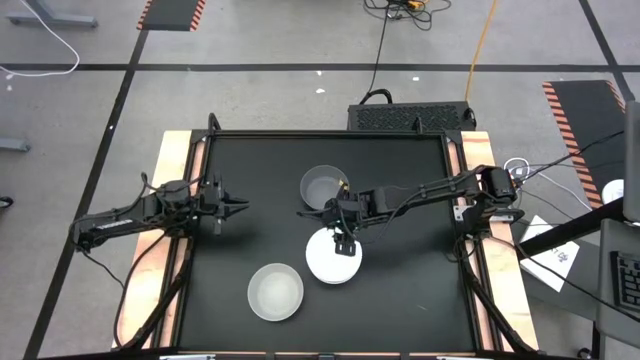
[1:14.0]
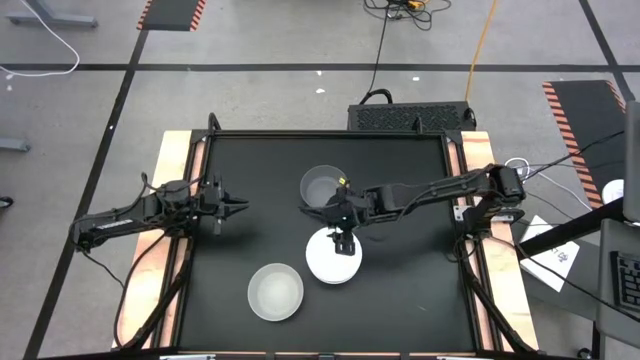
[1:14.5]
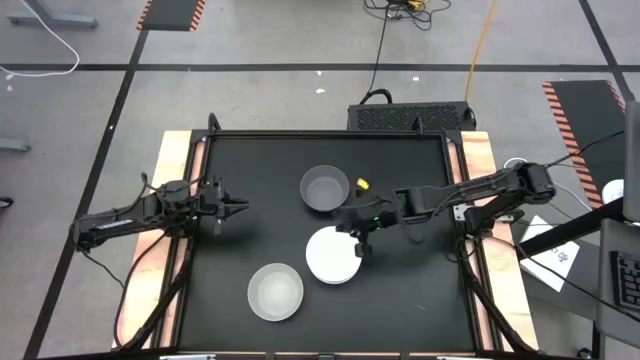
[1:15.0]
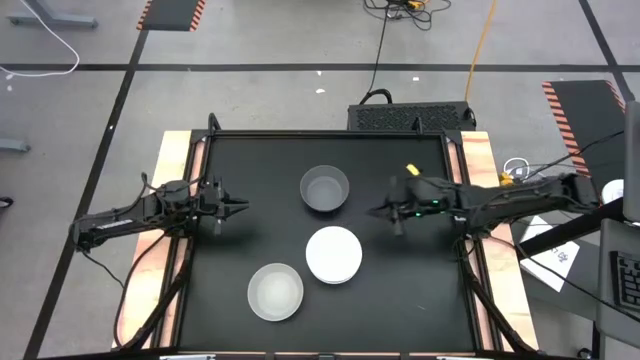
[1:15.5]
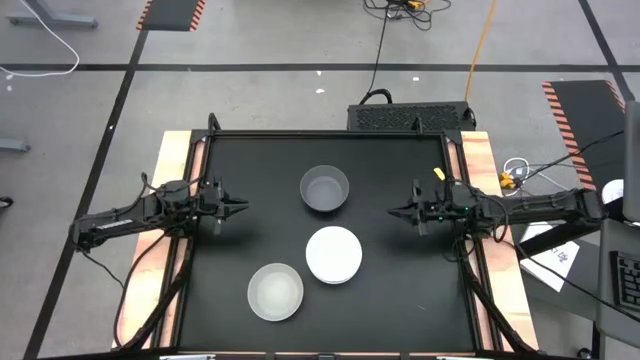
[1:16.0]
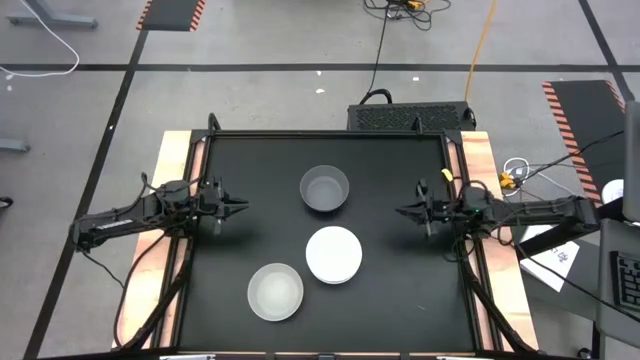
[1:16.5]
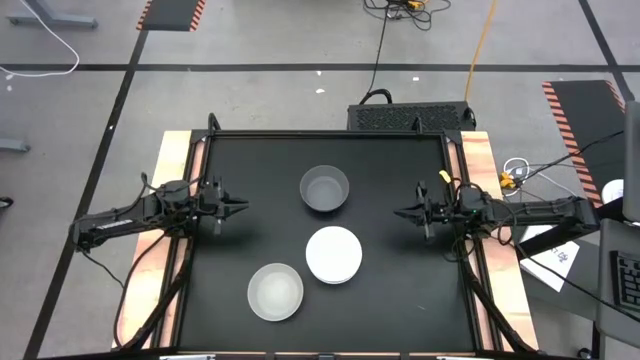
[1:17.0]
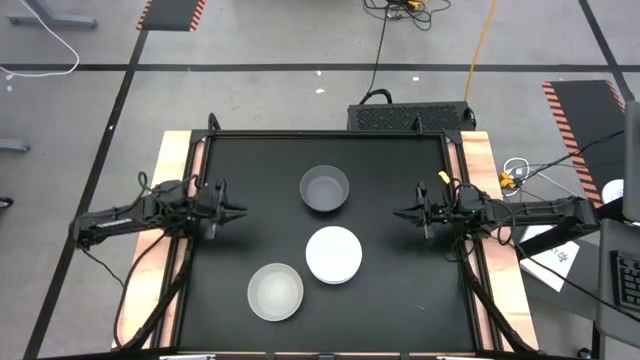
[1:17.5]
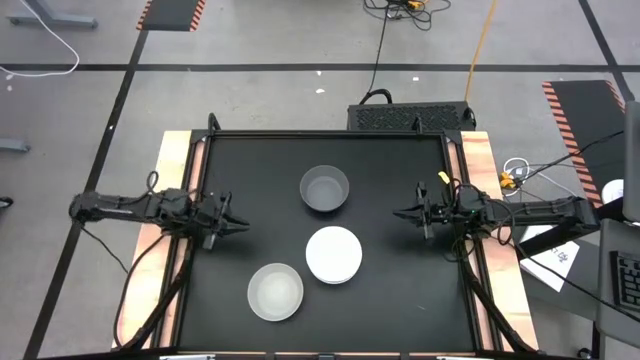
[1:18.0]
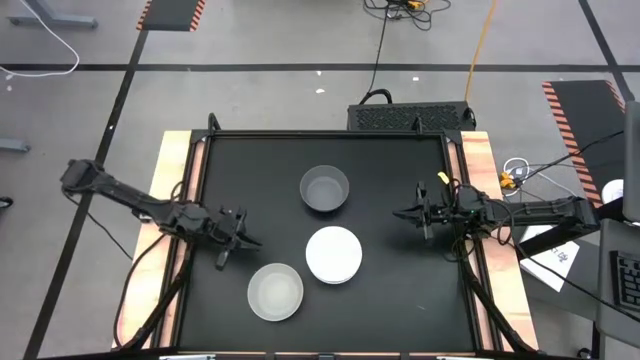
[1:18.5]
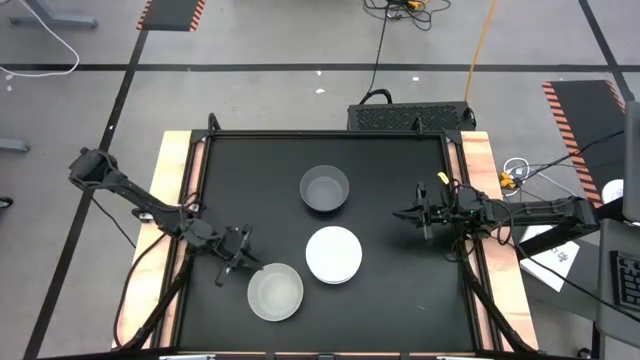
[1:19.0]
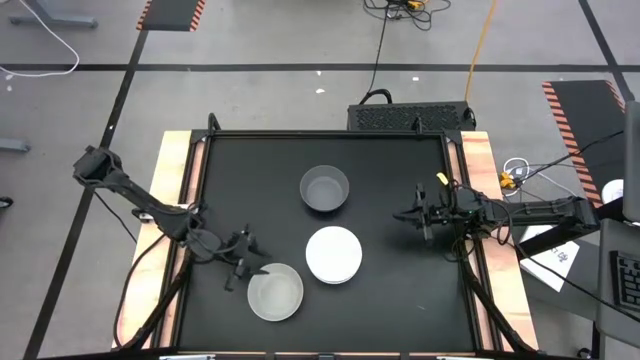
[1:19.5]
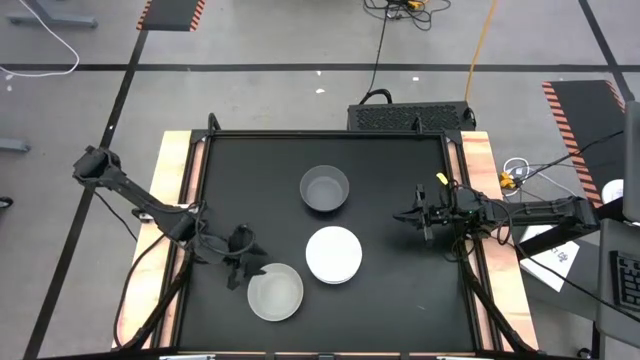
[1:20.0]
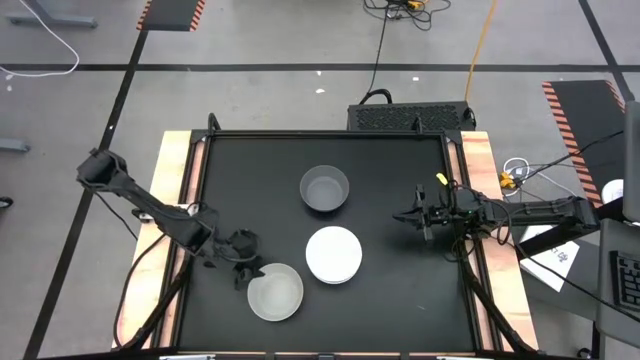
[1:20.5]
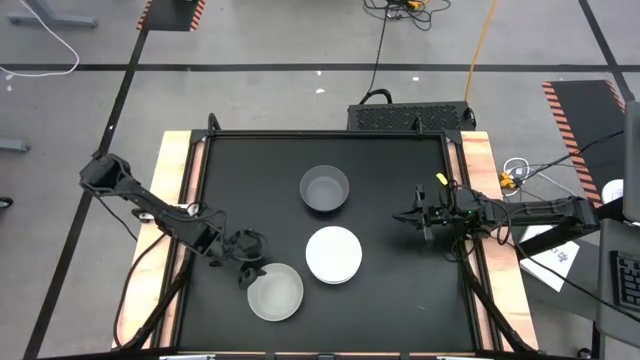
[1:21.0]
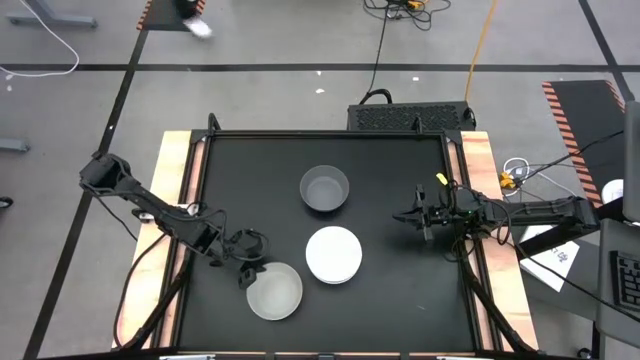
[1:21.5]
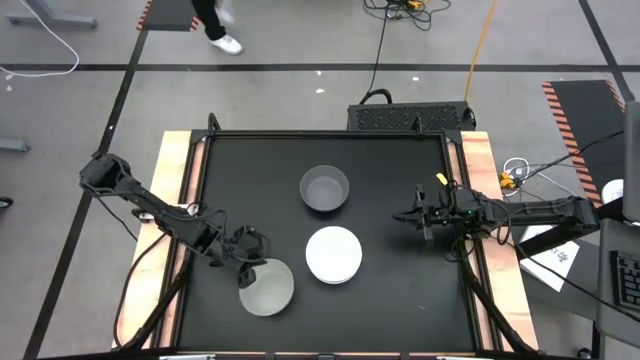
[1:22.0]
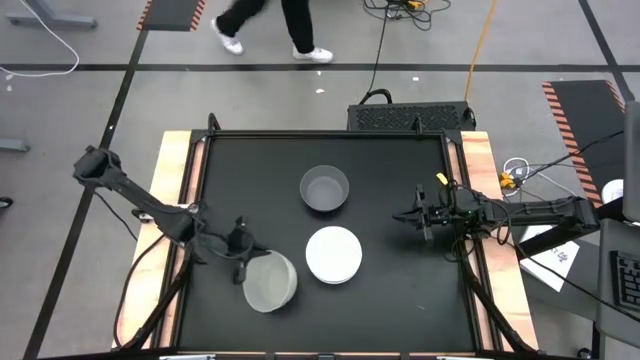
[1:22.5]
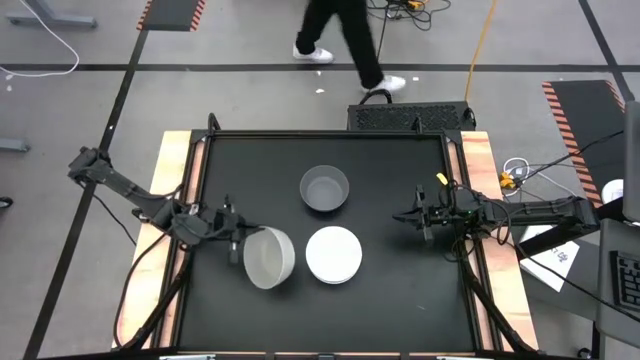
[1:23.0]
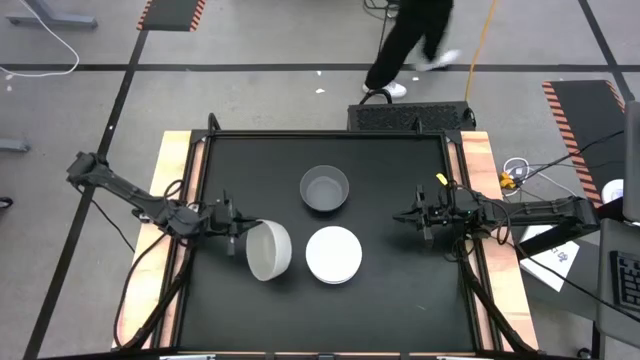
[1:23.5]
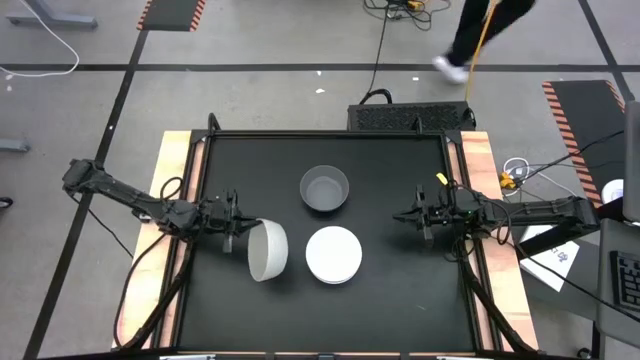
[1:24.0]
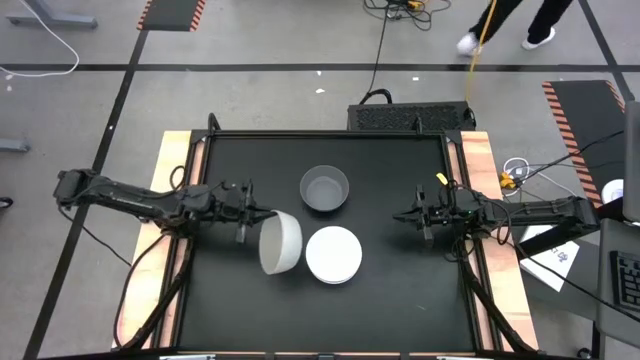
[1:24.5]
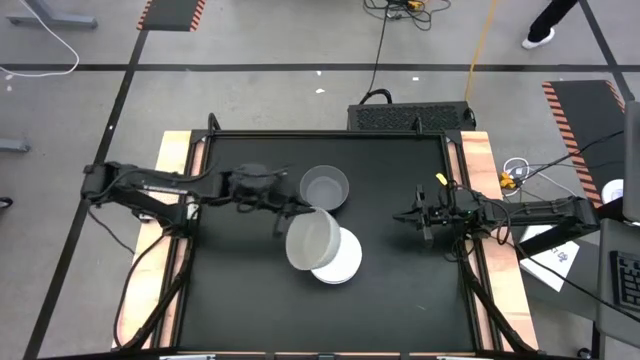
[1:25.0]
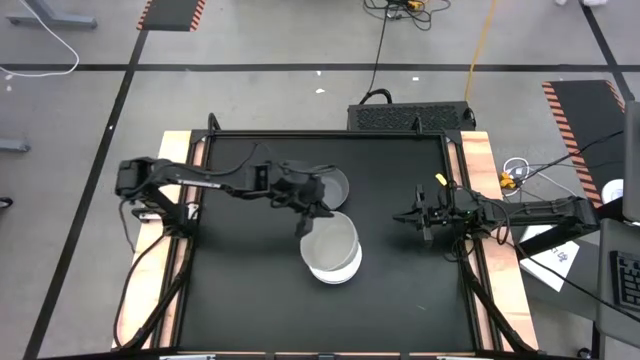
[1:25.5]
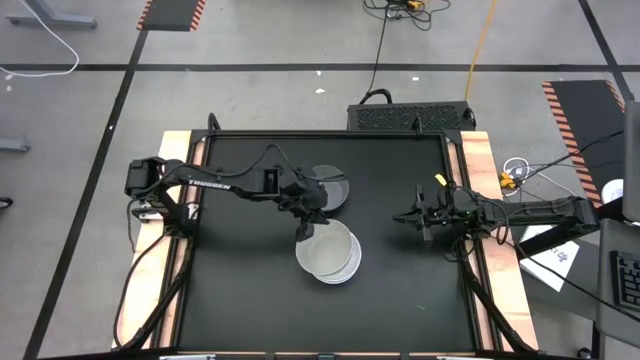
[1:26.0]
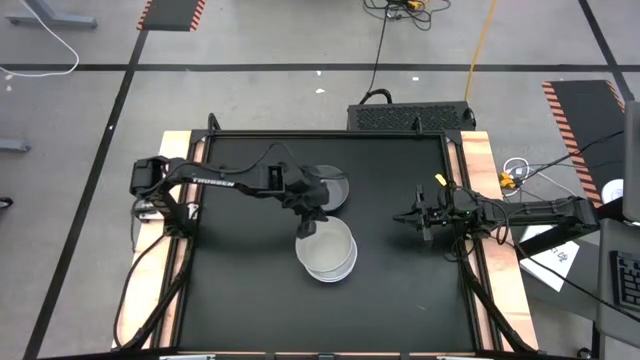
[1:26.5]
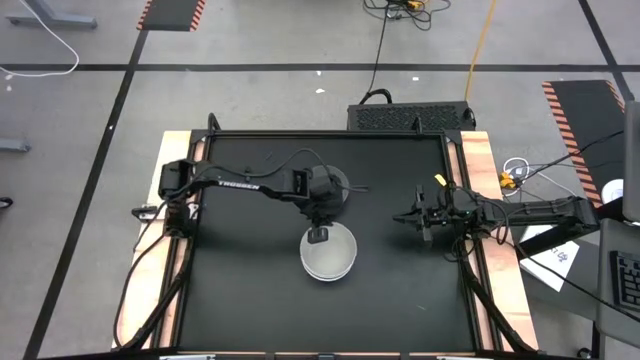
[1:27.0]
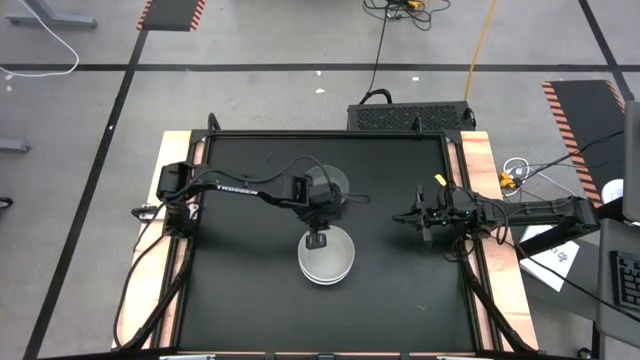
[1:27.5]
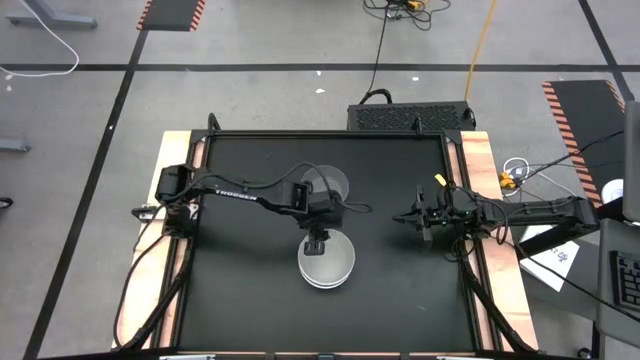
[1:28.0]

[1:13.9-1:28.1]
Task: Nest bowls inside each other
Stack the gray bowl on the white bowl

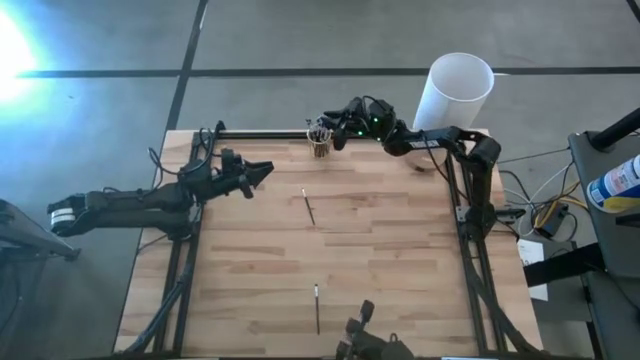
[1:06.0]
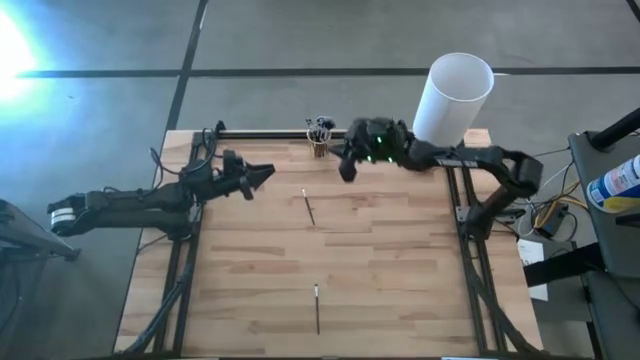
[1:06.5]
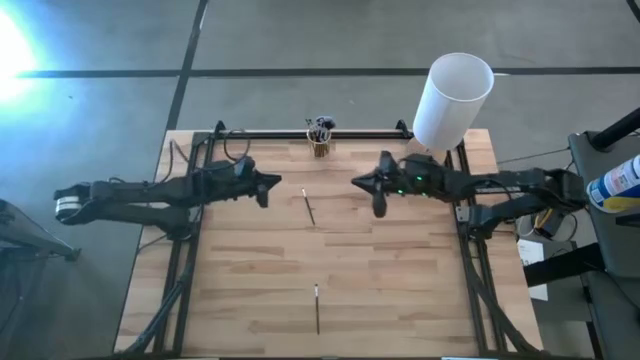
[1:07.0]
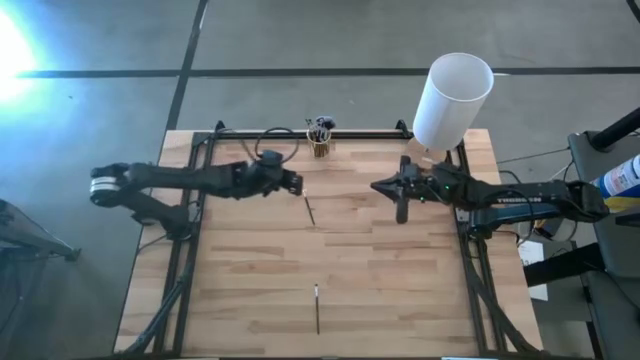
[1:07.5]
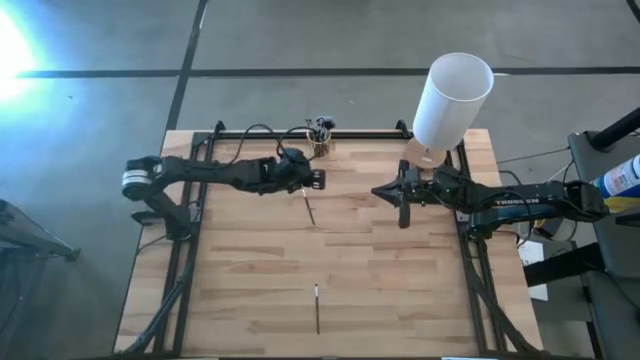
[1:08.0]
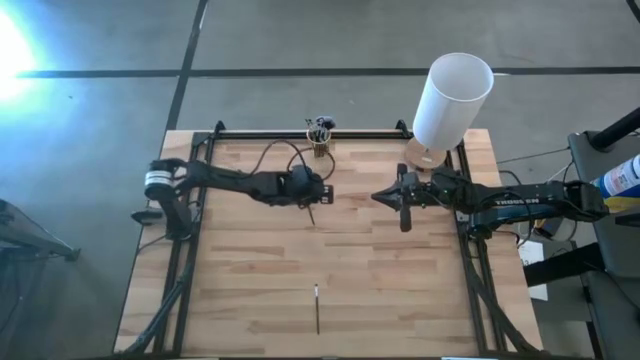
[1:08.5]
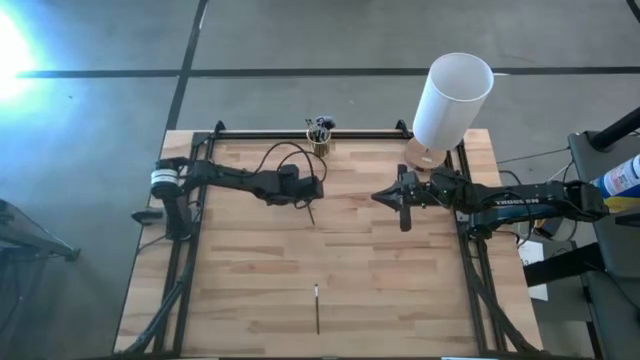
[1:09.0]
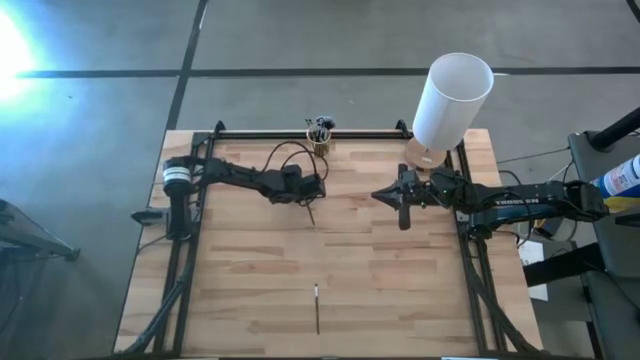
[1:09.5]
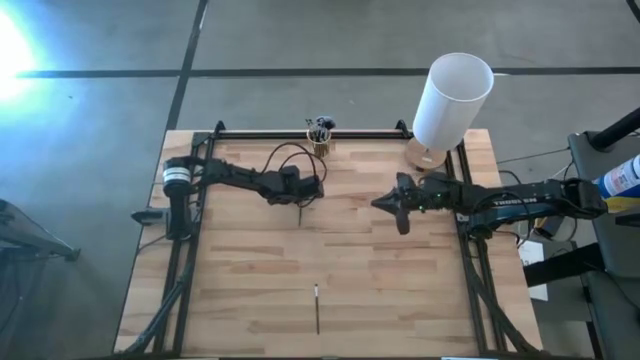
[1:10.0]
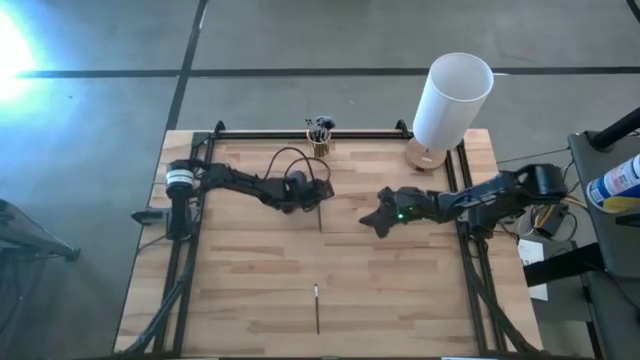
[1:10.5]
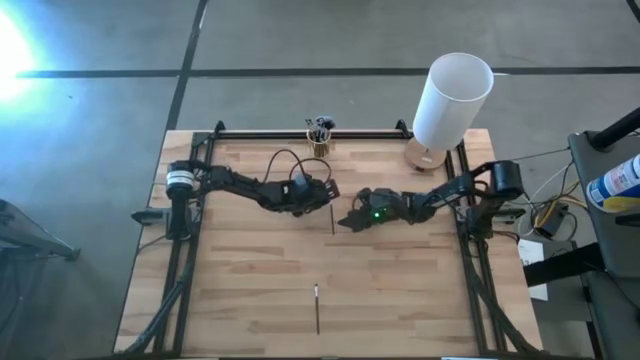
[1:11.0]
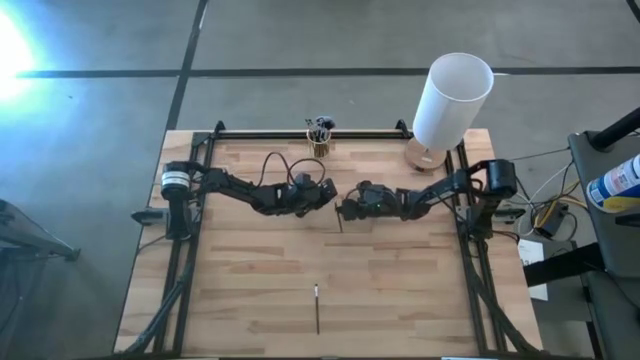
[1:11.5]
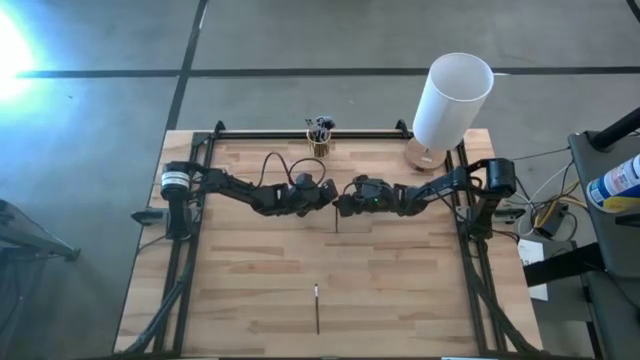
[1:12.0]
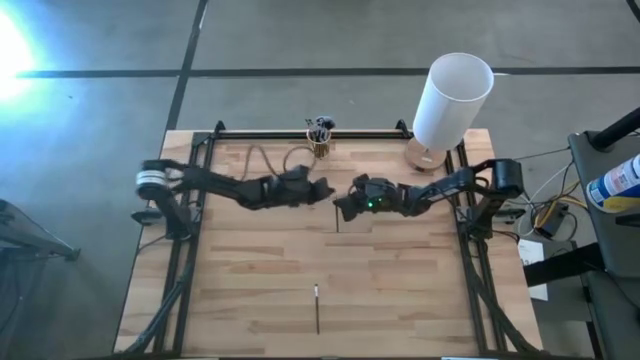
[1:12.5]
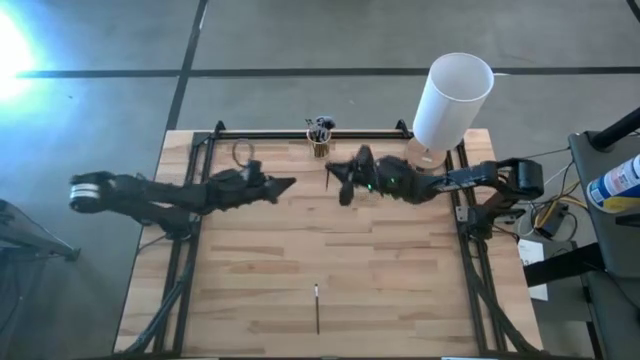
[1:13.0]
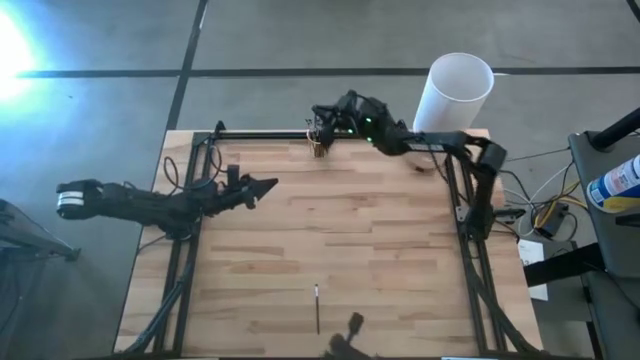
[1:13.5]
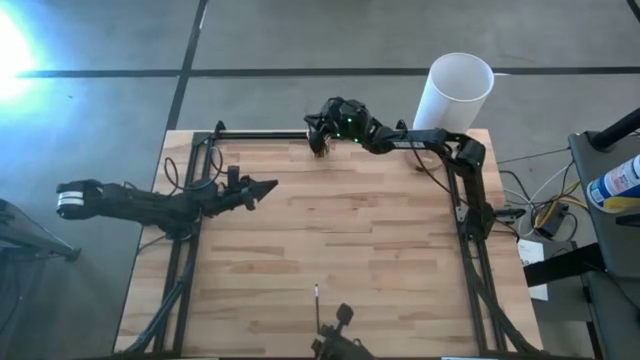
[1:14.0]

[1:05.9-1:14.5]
Task: Put items in baskets/containers
Put the black eyeshadow brush into the yellow pen holder
